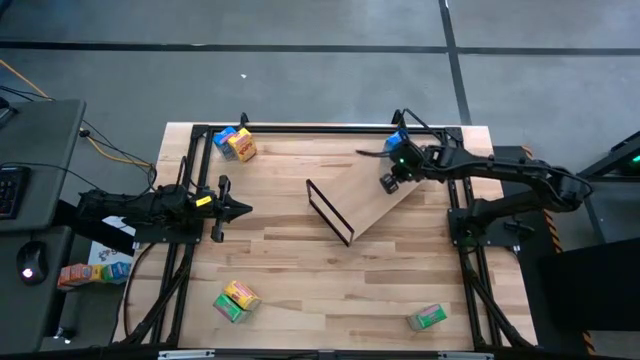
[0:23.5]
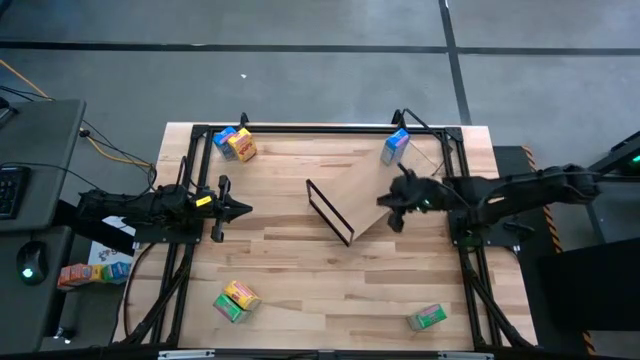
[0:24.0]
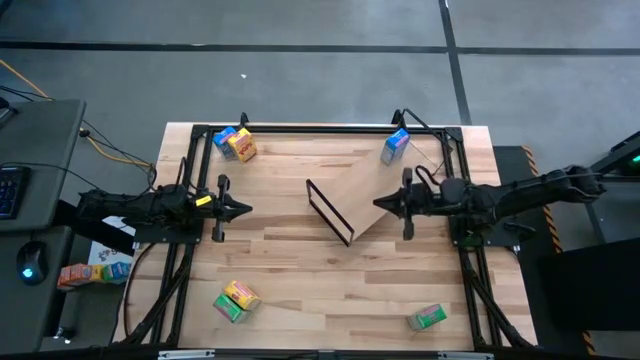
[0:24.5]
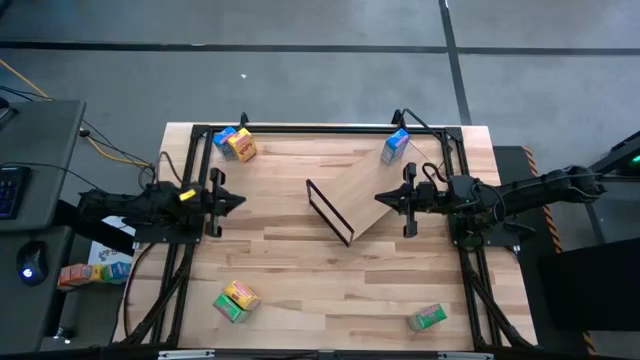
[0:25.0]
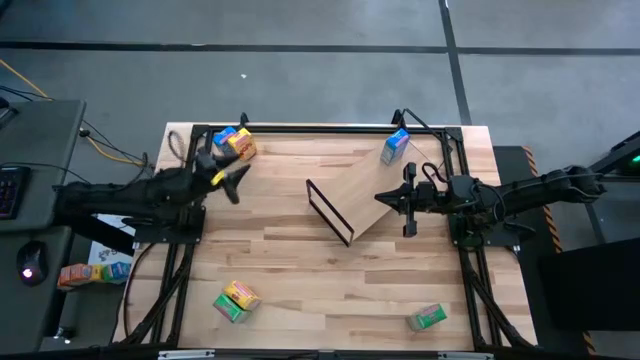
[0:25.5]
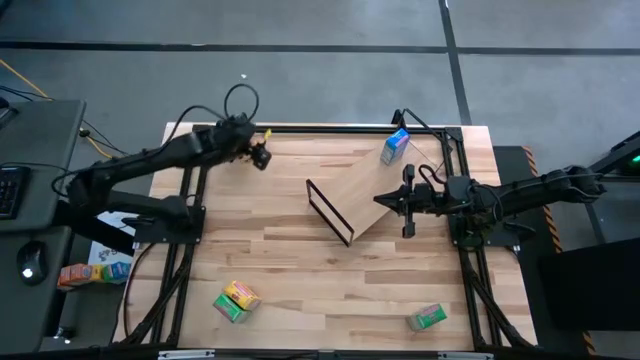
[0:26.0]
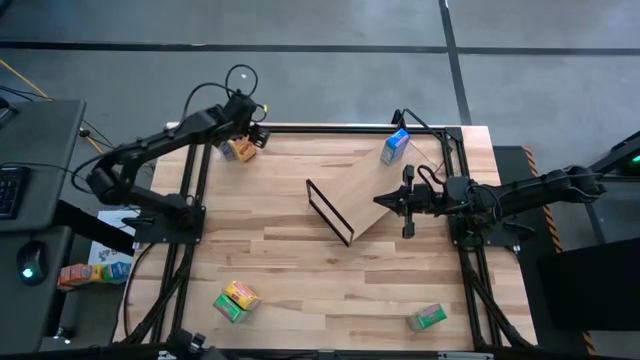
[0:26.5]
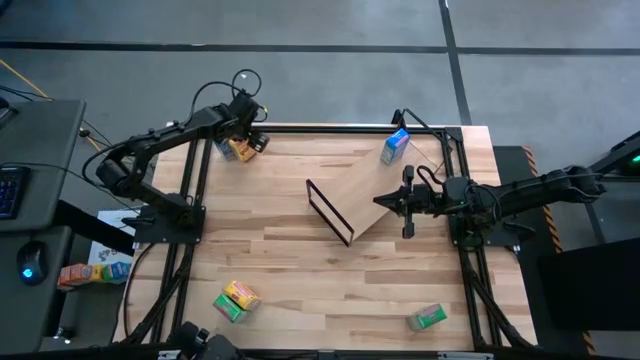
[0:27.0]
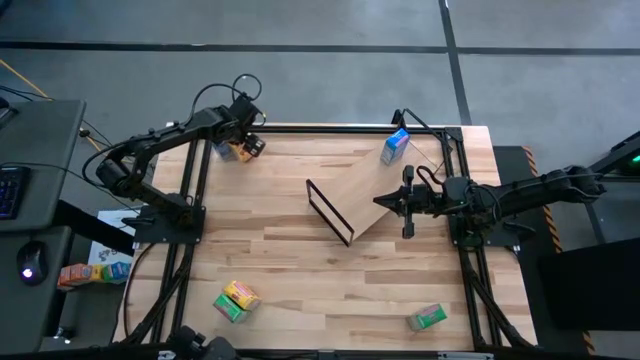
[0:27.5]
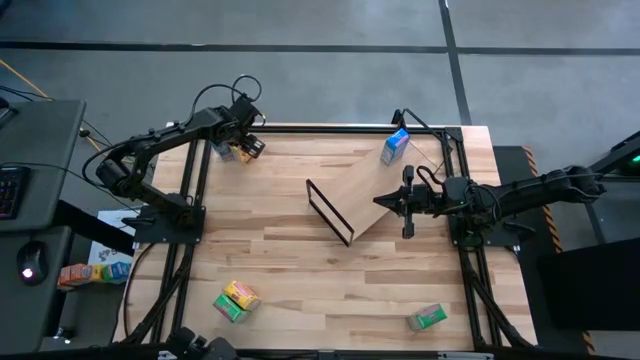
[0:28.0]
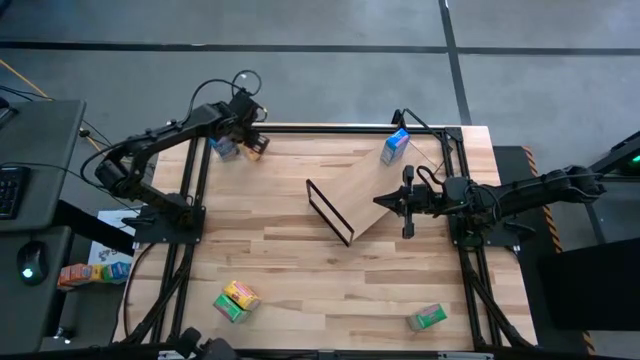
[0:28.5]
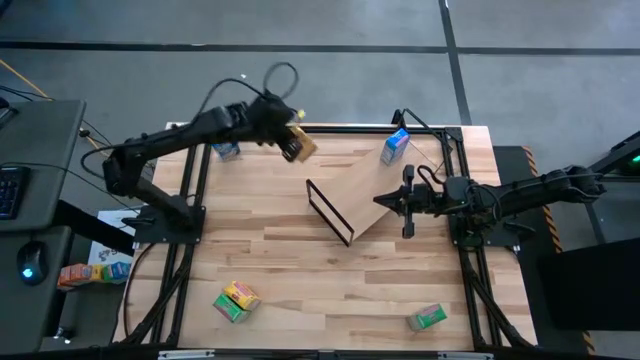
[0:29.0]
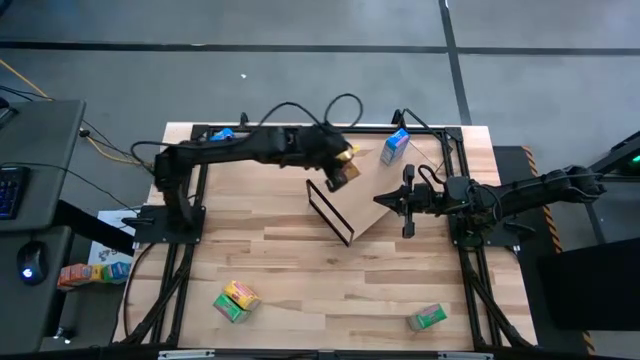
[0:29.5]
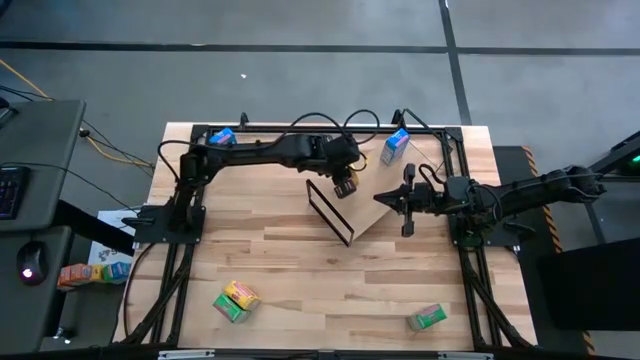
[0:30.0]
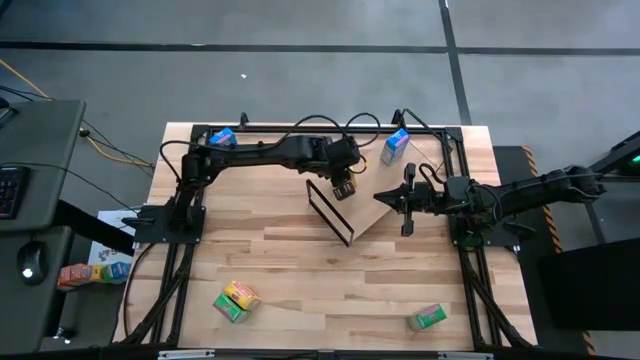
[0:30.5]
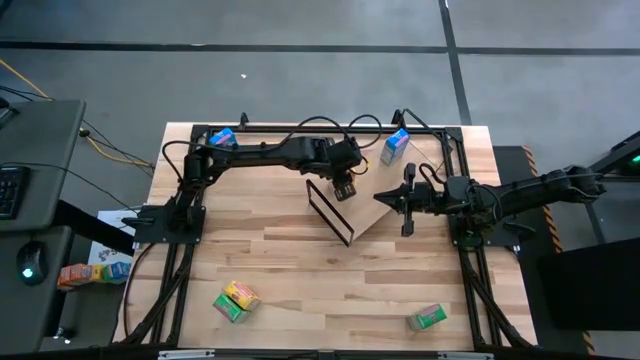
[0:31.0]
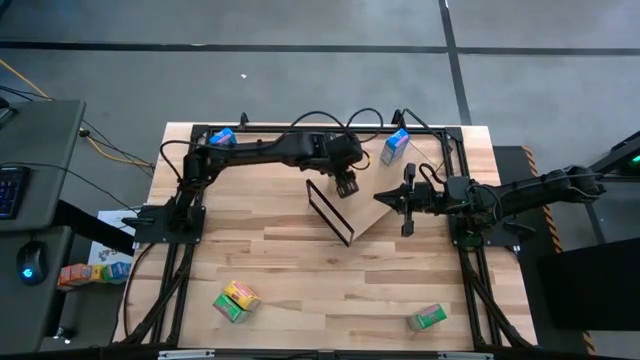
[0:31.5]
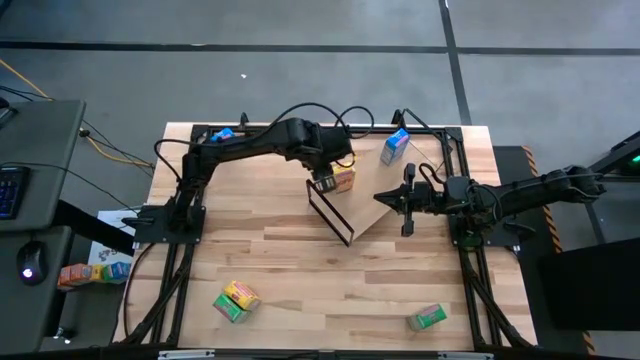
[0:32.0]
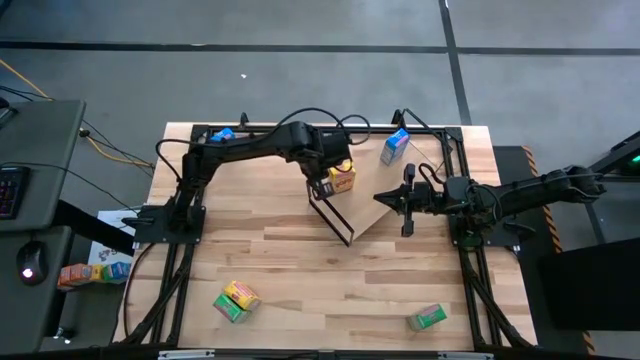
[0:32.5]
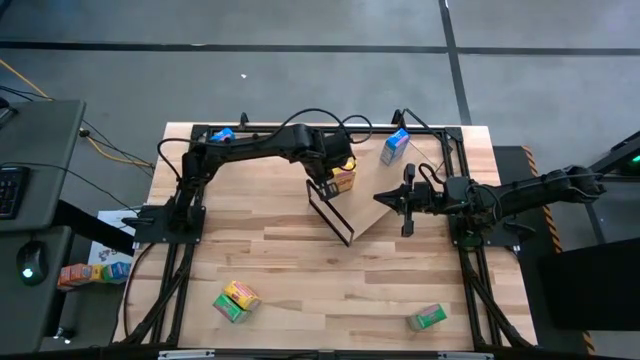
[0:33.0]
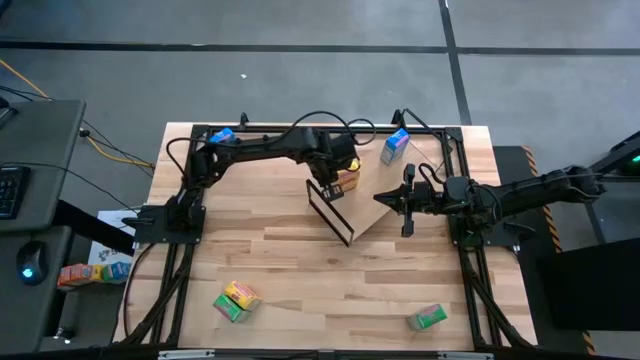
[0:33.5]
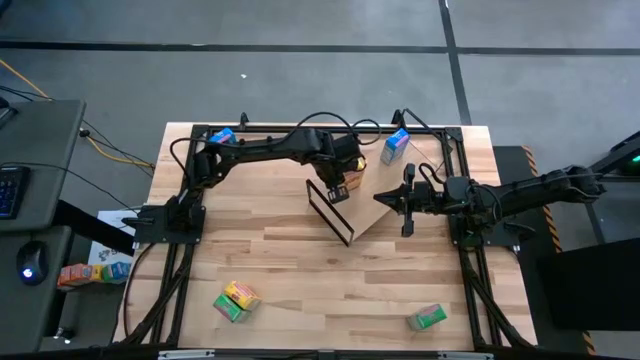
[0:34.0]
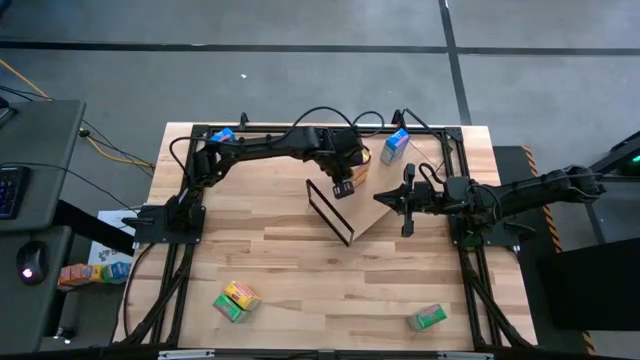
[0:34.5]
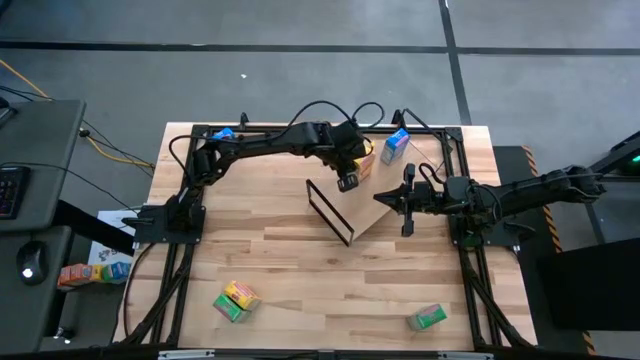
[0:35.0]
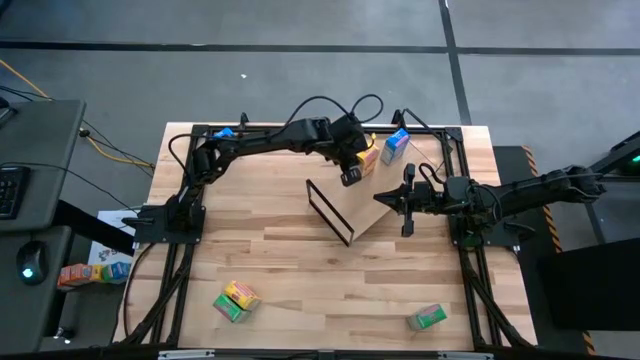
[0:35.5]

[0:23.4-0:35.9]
Task: Stack cereal on shelf
Put the top yellow cereal box on the shelf

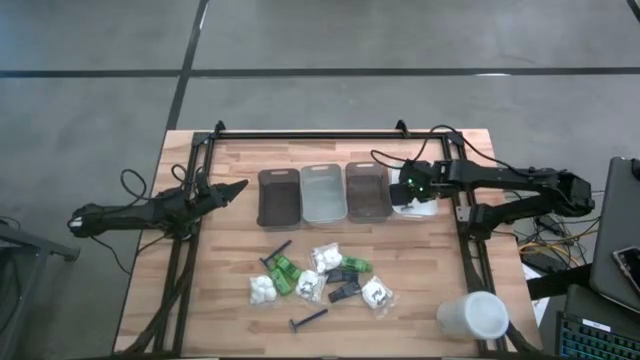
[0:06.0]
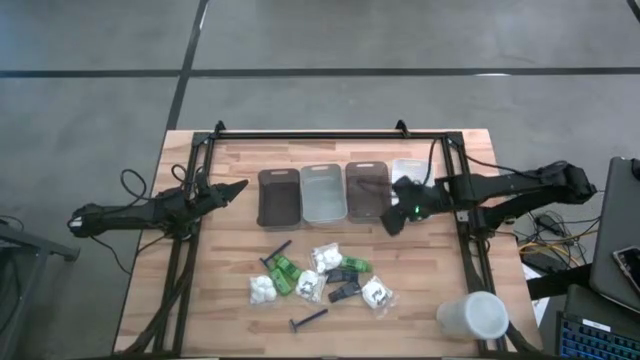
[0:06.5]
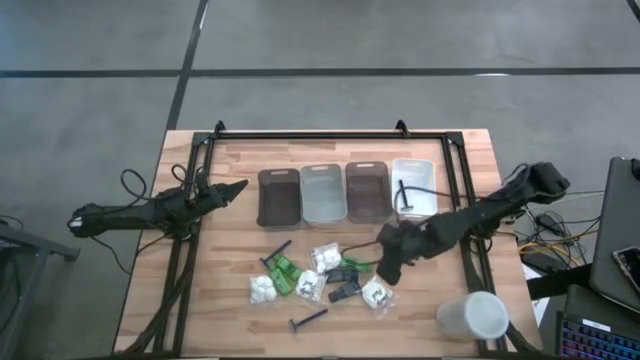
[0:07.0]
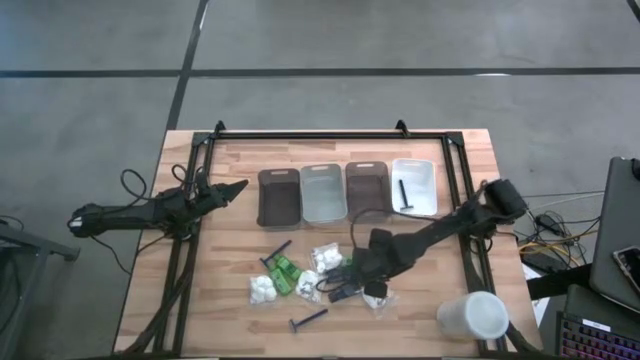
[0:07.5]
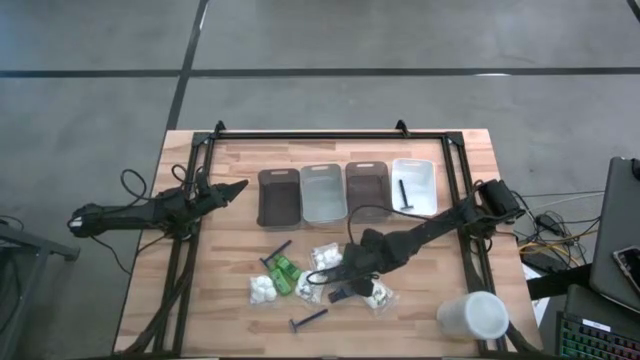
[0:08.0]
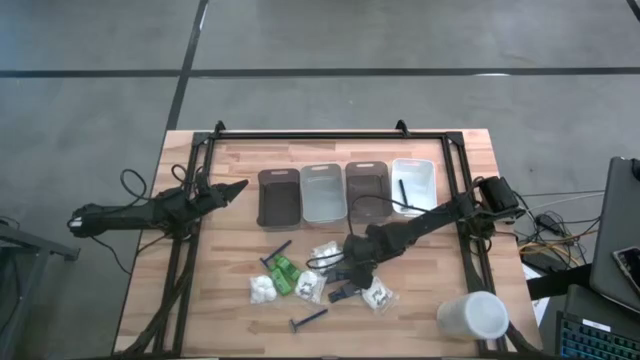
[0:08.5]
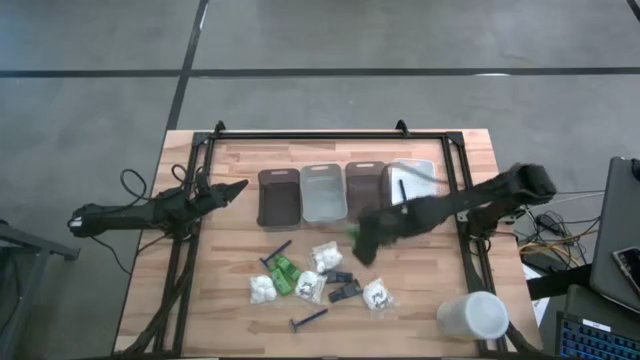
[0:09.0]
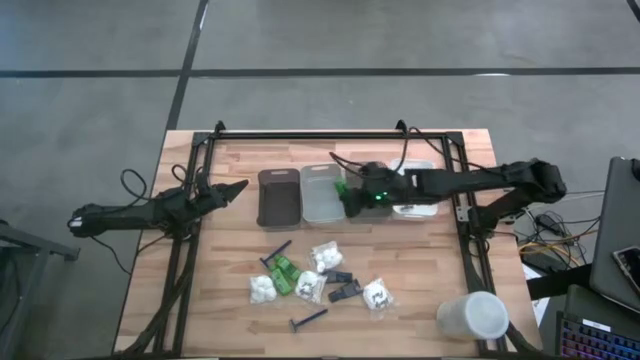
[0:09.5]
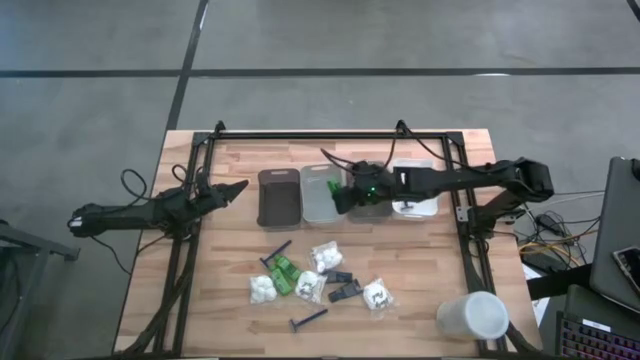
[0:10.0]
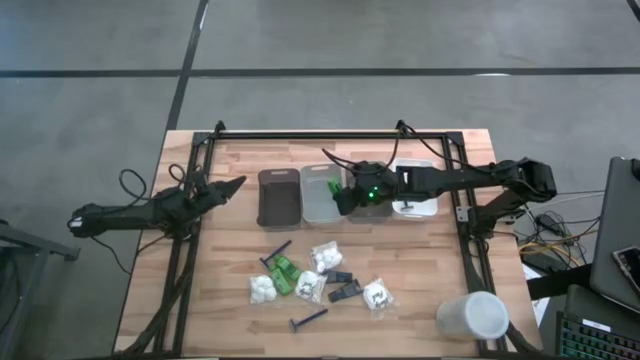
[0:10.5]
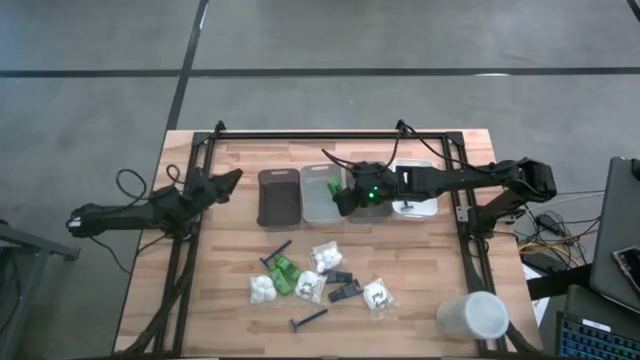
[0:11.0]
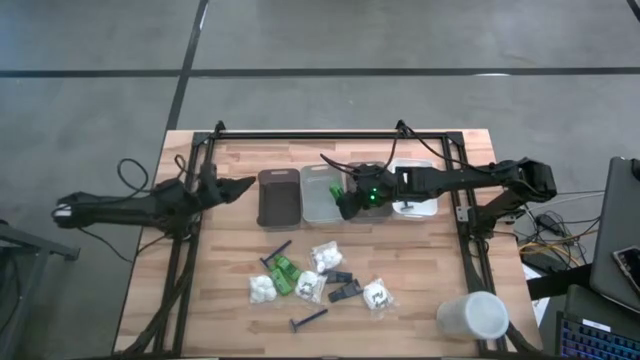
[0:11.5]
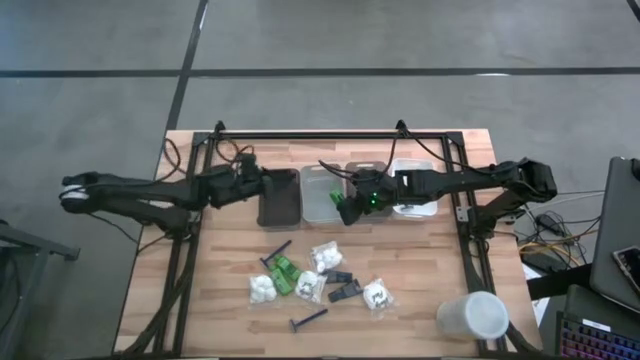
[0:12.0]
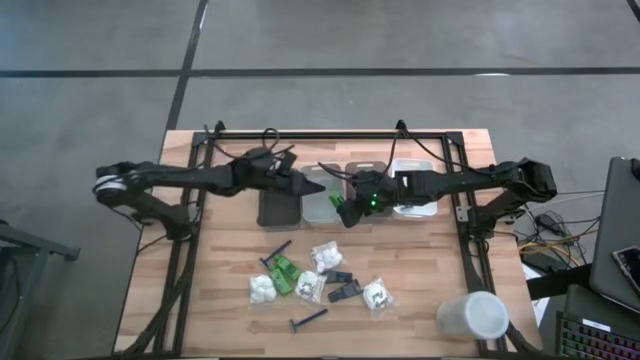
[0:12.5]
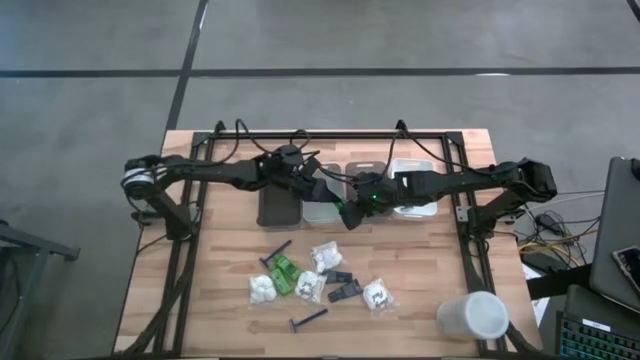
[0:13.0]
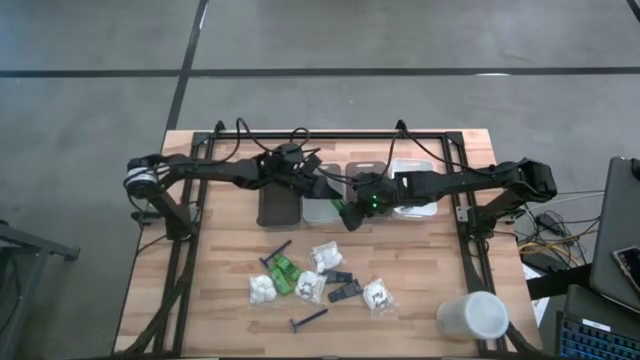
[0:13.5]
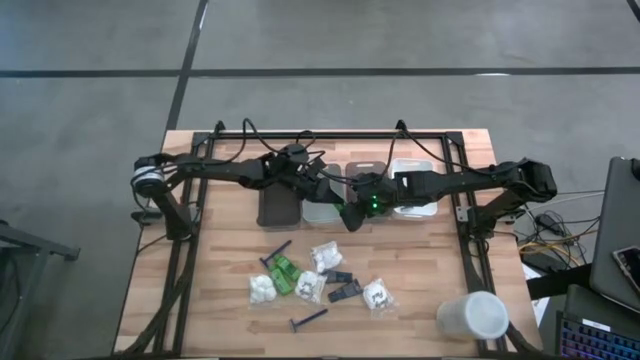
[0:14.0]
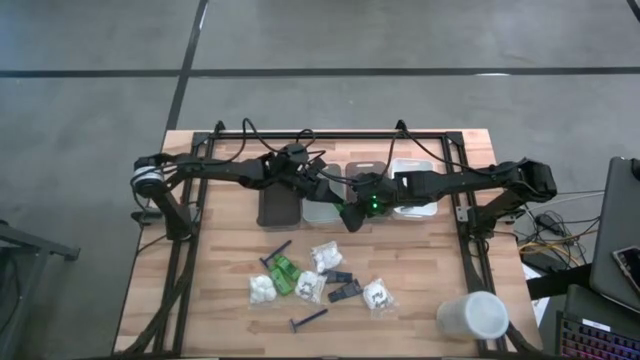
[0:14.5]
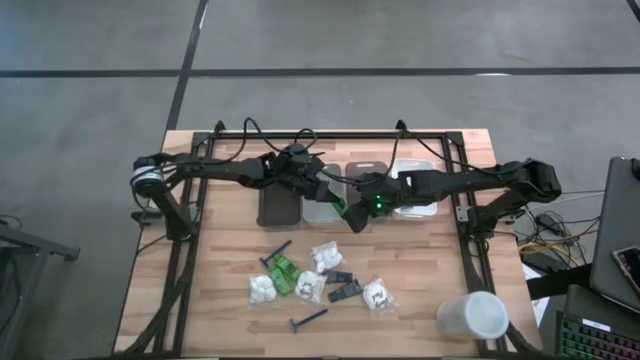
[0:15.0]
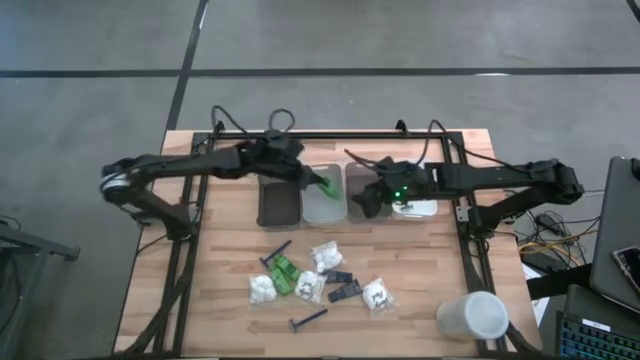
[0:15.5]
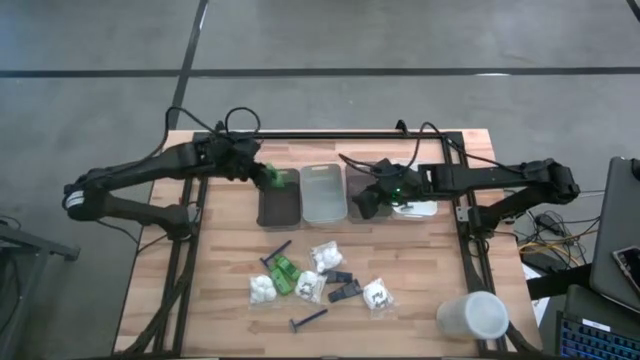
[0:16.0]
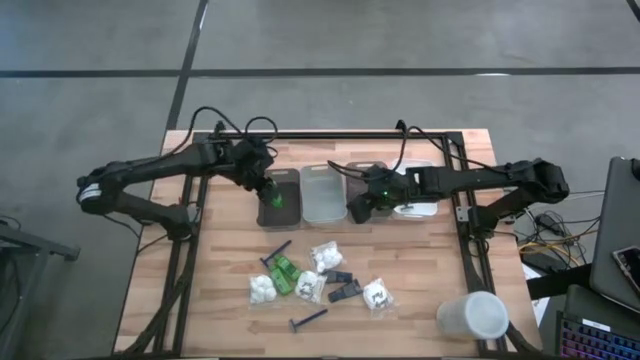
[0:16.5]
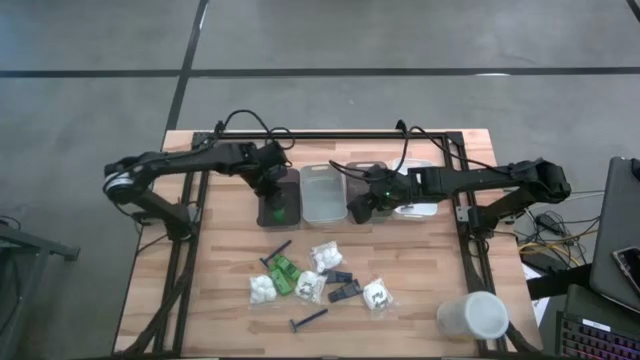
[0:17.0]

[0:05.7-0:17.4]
Task: Pick & Place Travel size toiletries
Put the right shampoo into the left black bin
